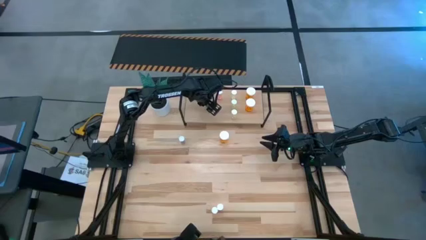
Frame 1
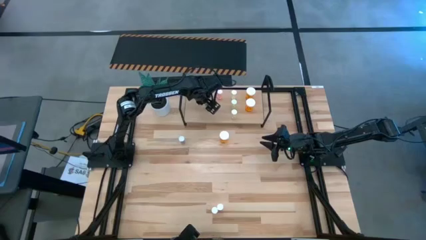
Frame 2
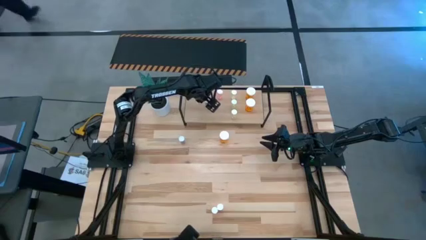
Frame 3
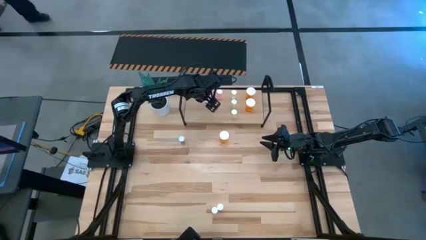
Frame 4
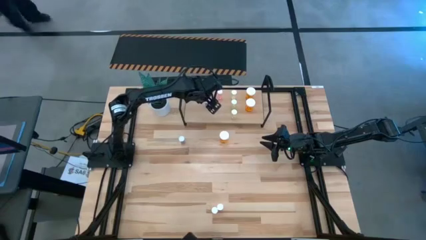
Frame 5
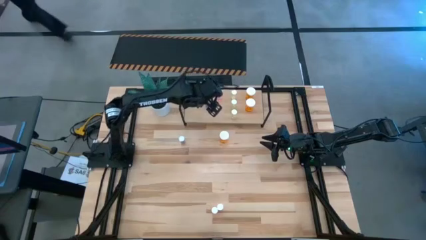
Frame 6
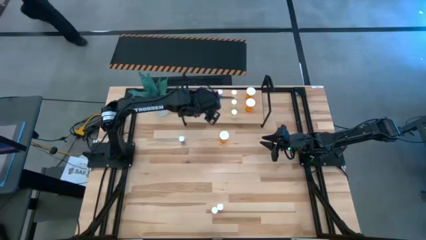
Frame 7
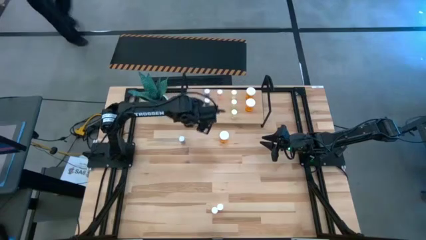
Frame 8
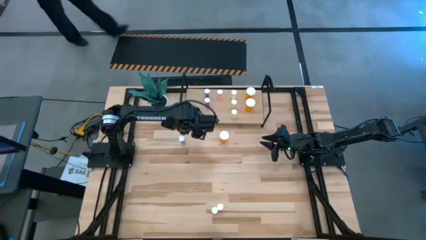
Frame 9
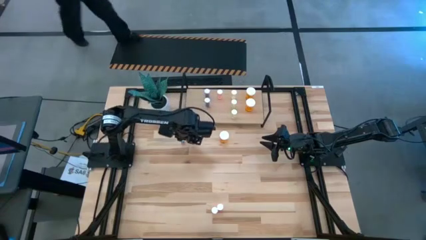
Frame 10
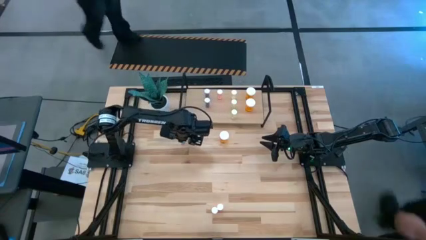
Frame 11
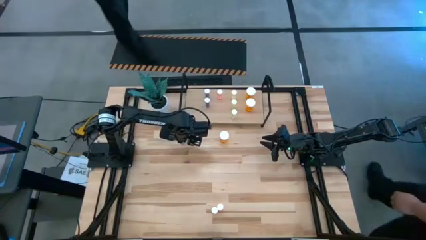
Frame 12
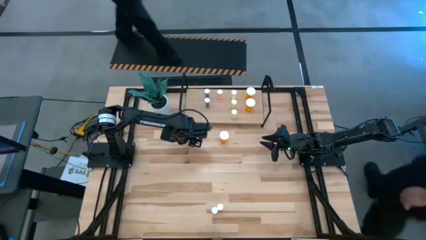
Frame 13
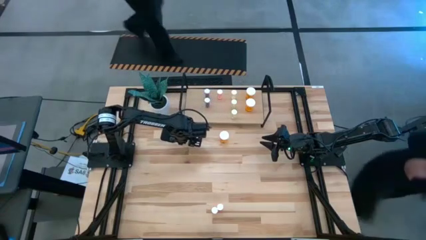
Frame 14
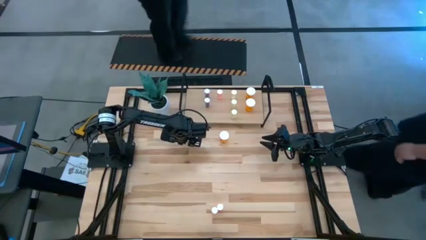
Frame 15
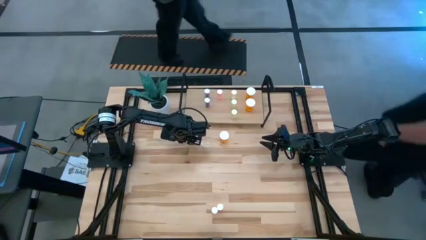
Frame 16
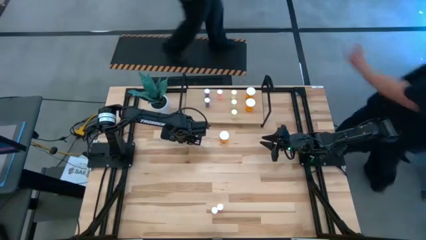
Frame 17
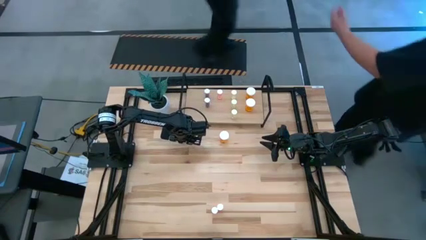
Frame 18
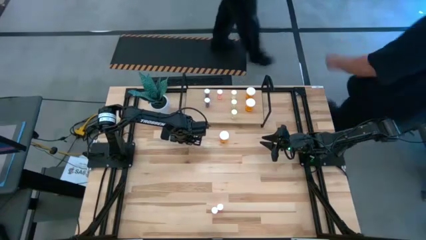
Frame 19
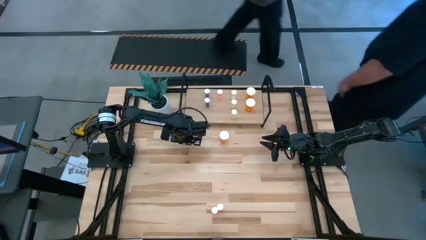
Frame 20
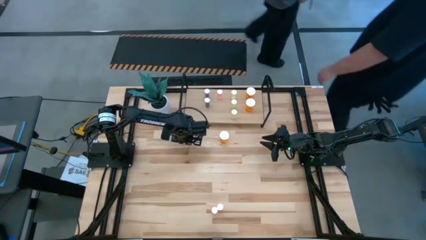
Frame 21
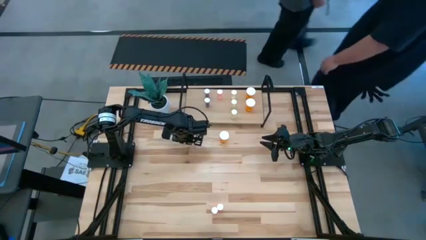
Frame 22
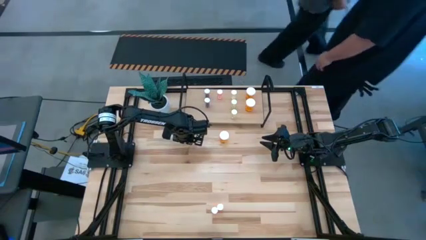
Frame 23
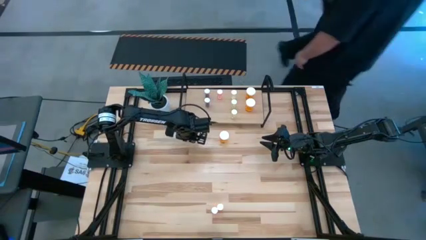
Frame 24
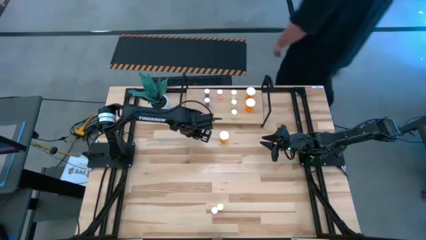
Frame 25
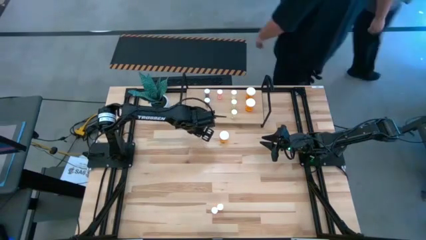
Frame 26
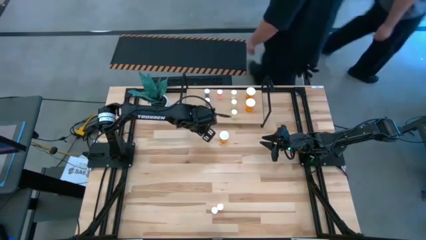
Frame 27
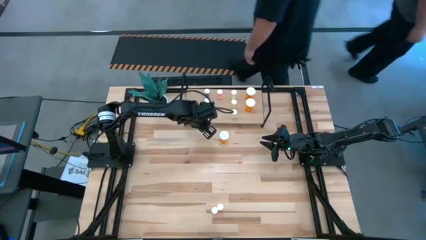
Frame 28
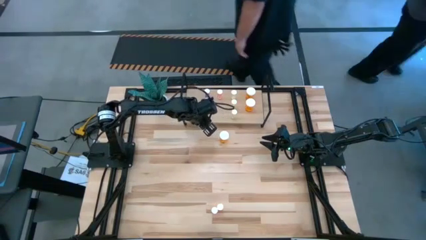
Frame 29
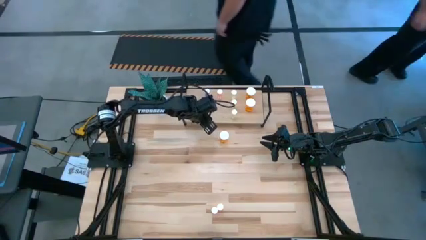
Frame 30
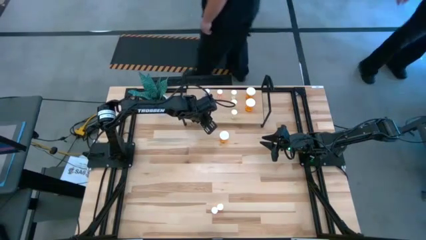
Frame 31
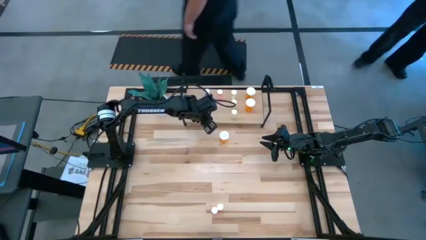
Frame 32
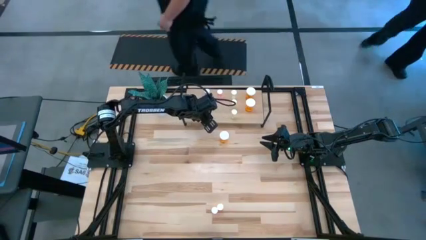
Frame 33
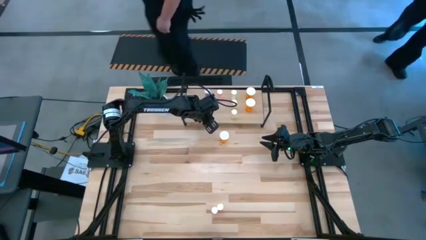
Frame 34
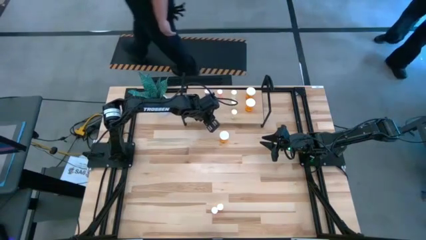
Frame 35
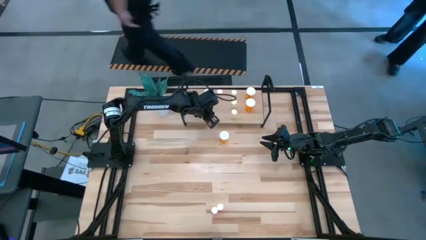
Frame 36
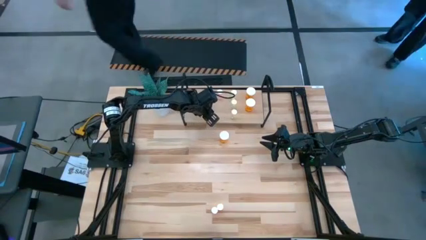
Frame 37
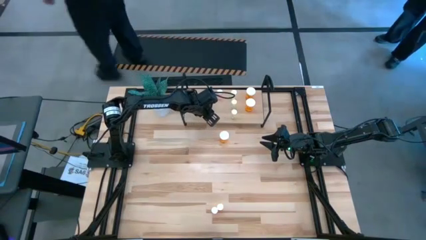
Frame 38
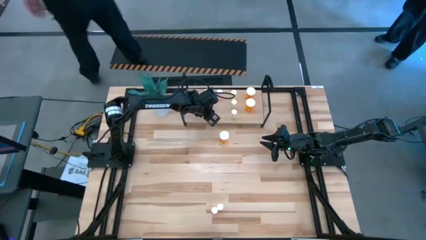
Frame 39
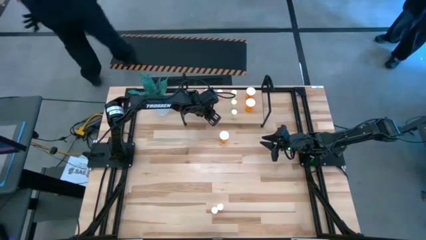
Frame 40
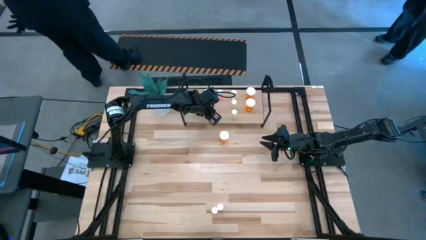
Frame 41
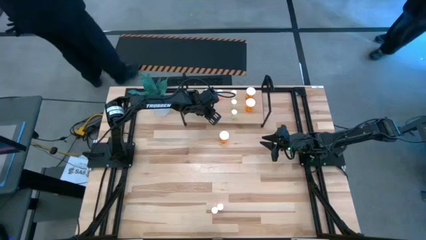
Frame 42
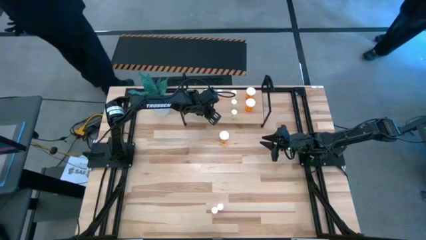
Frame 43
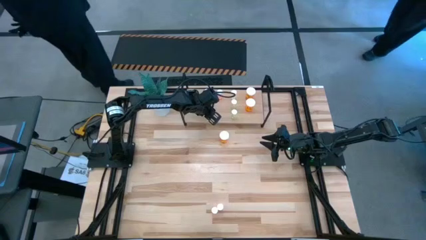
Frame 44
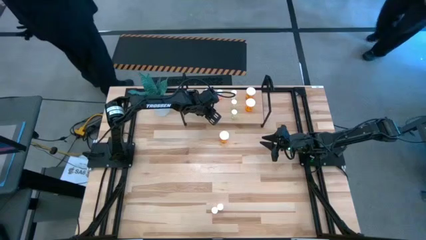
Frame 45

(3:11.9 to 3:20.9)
Task: Pick and place medicine bottles onto shelf by color
Put the blue pill bottle on the shelf

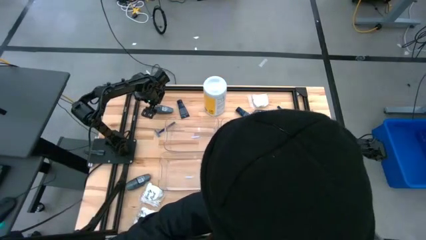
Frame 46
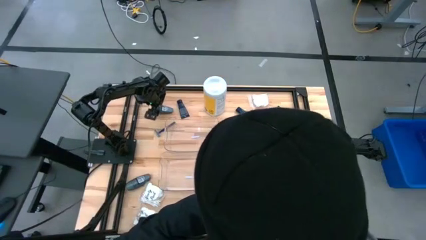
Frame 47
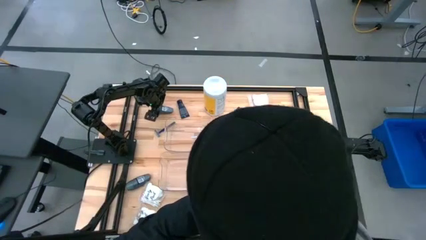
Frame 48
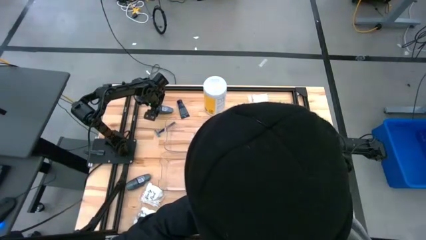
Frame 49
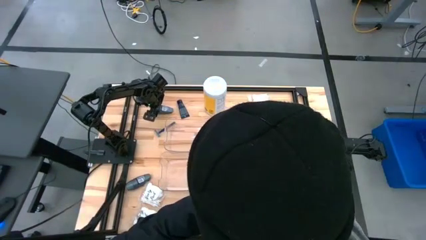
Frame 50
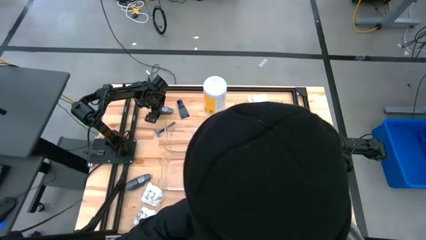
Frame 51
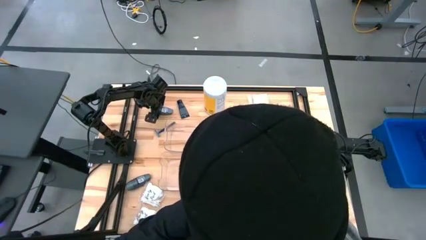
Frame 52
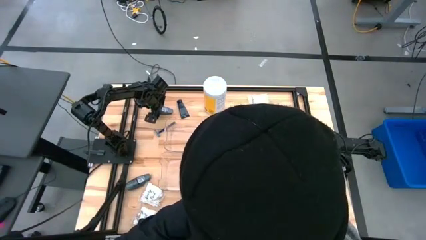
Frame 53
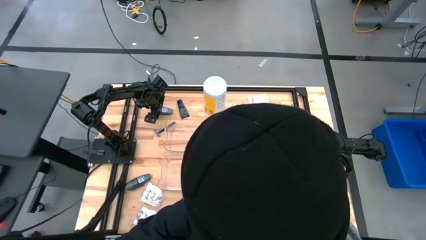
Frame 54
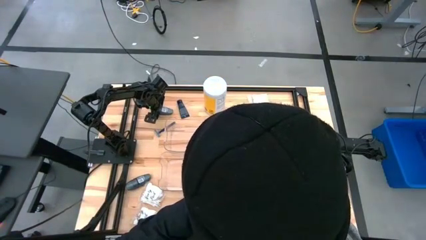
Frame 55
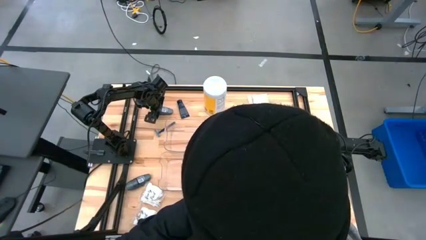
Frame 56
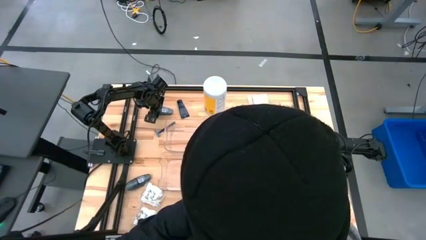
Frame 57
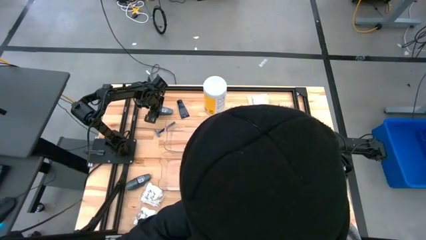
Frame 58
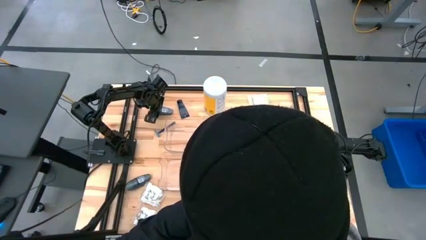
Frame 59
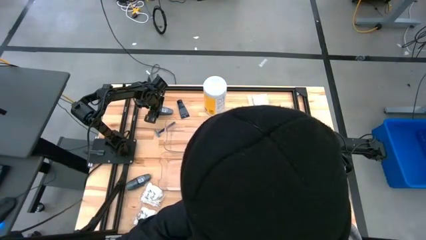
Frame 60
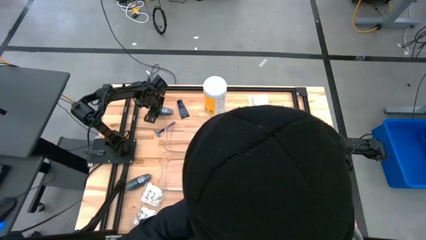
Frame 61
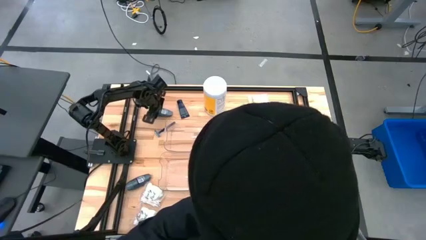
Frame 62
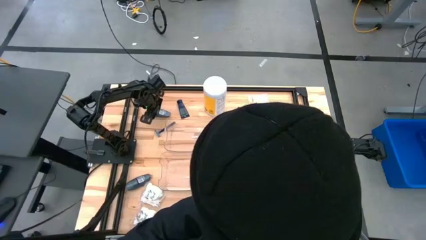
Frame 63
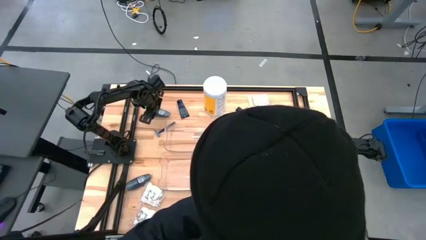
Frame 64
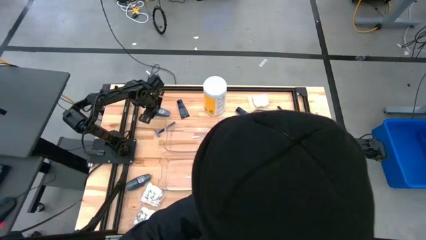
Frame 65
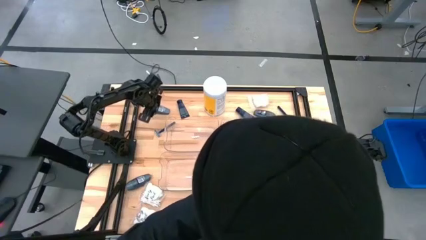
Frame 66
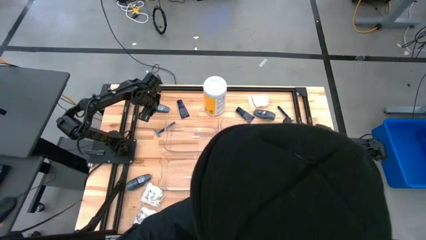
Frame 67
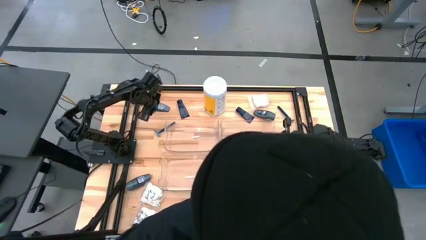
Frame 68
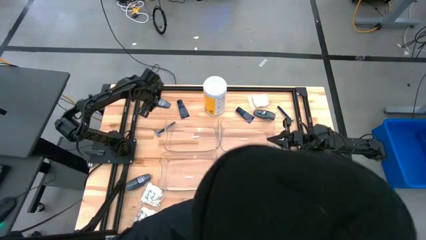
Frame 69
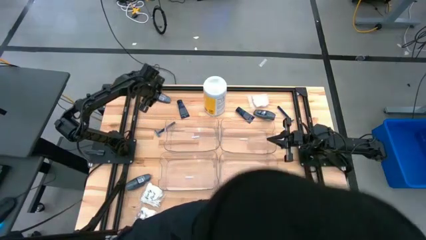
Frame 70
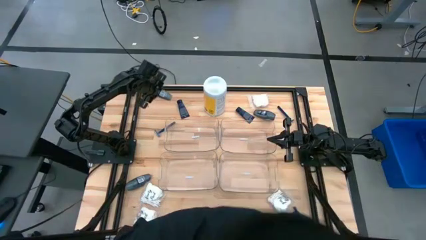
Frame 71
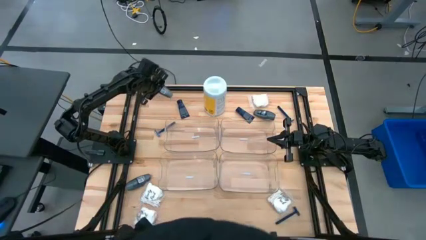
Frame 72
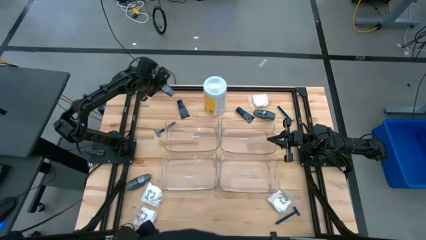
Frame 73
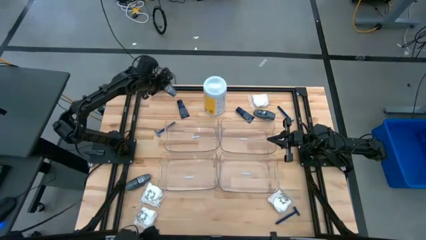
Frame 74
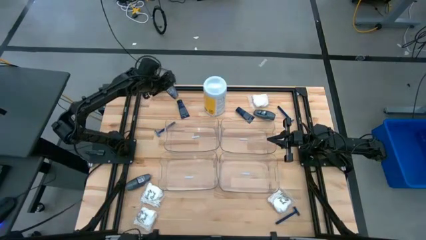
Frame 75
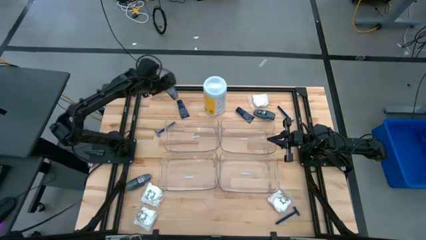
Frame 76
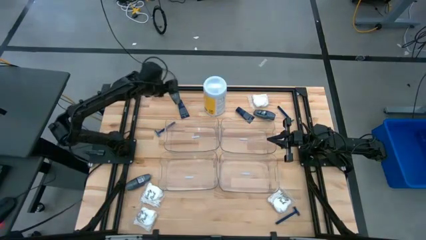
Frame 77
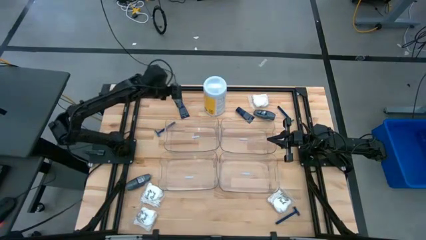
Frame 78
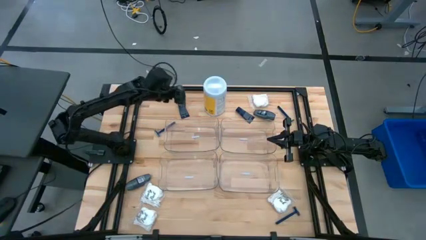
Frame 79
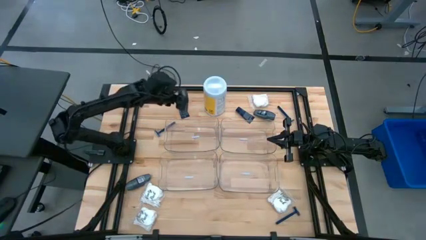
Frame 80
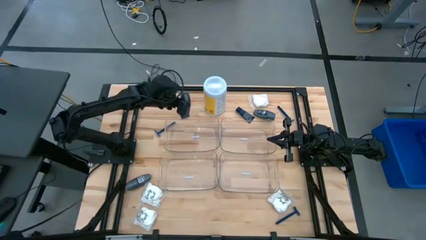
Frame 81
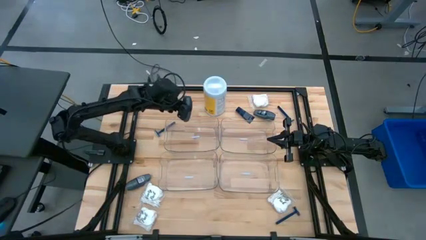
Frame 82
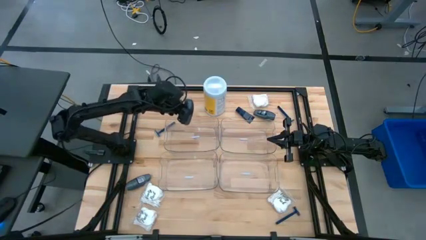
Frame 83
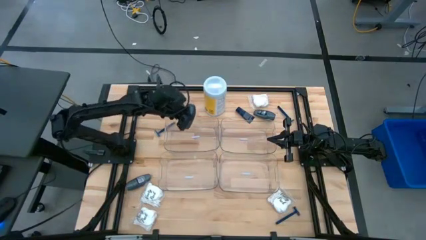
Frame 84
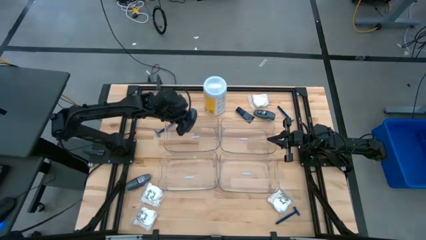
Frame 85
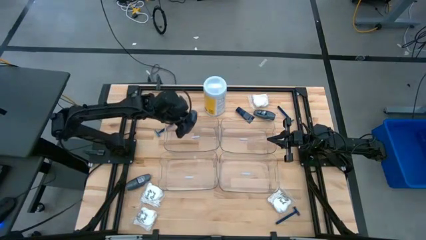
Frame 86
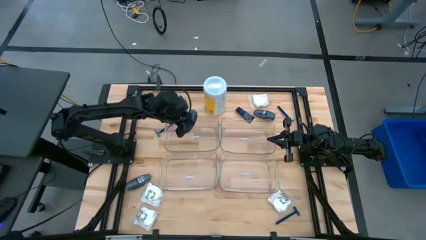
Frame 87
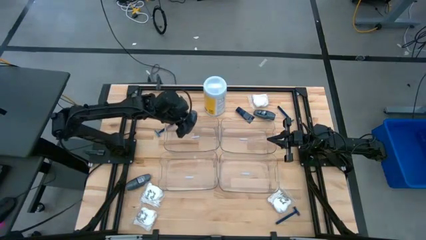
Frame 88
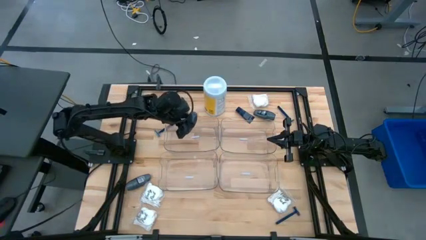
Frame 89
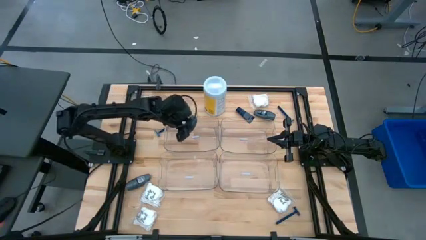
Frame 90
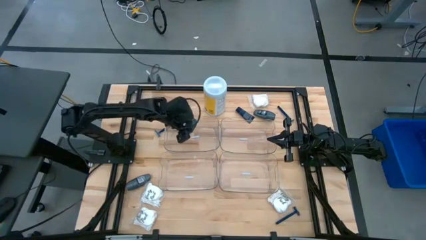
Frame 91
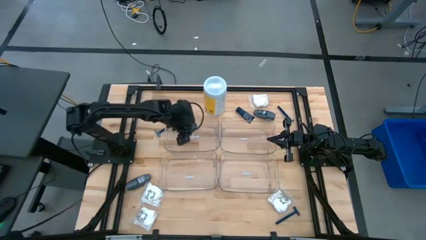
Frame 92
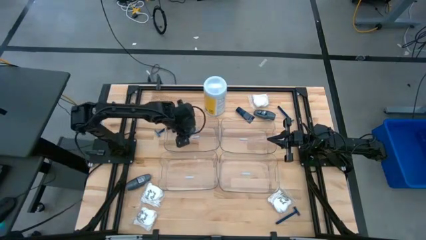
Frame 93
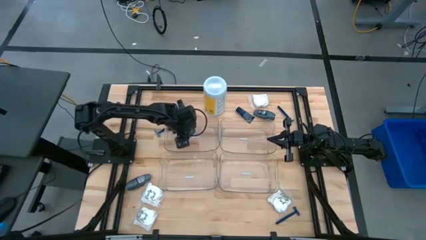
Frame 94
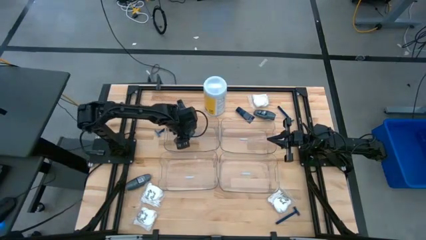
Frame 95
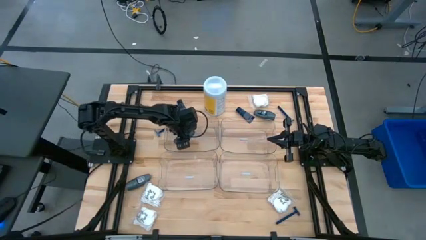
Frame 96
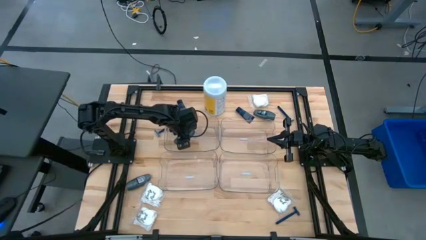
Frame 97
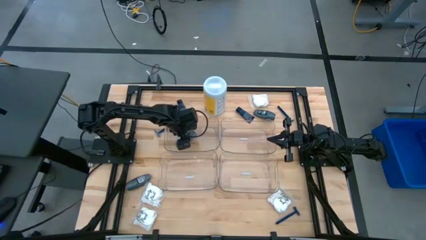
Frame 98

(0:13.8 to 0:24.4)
Task: Pick & Place Travel size toiletries
Put the top left black deodorant into the top left transparent bin
